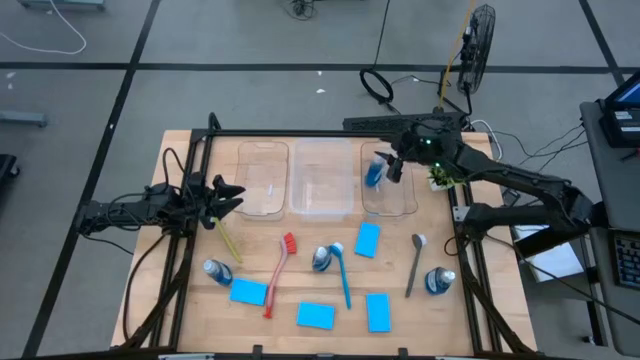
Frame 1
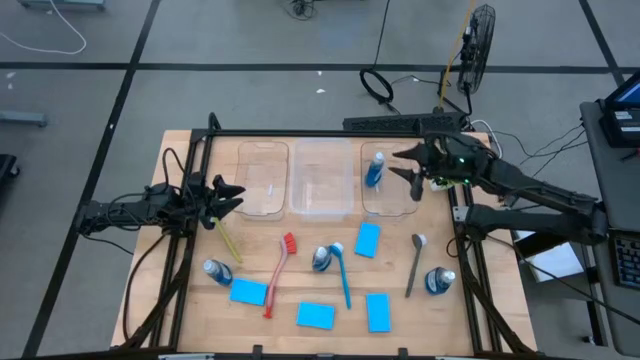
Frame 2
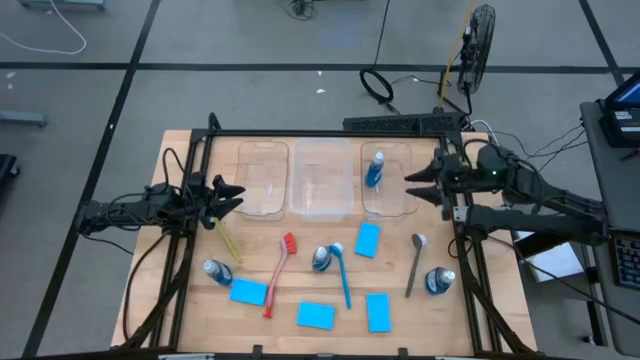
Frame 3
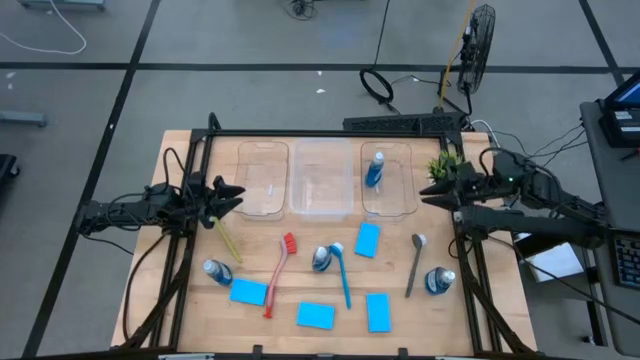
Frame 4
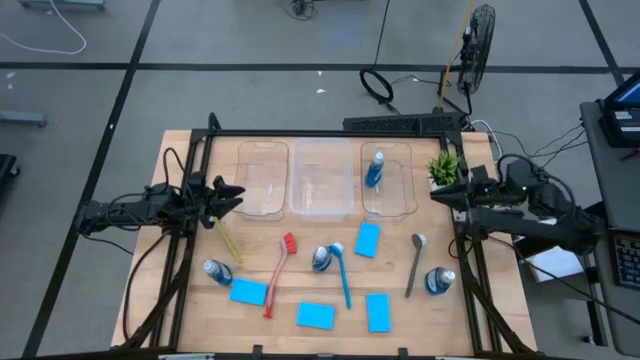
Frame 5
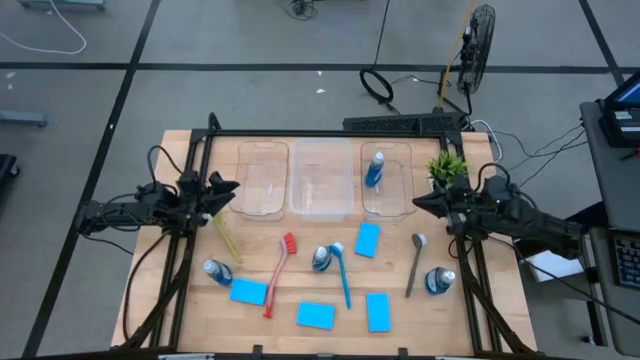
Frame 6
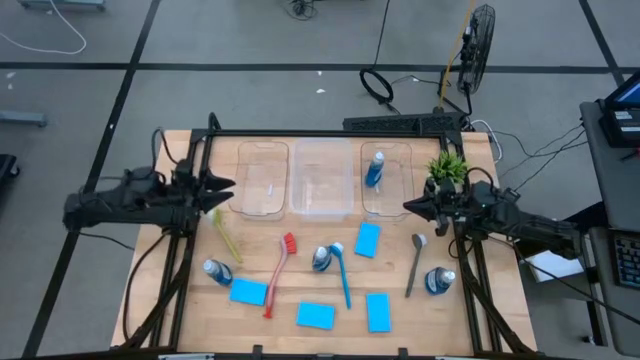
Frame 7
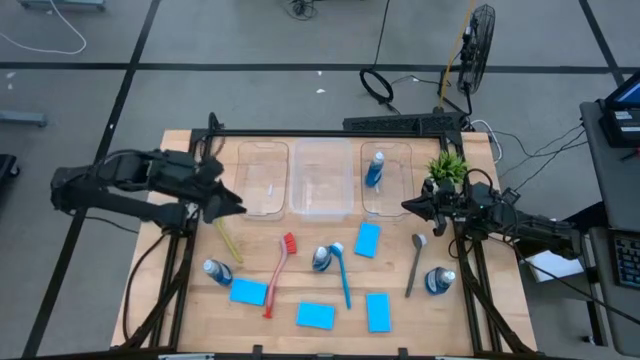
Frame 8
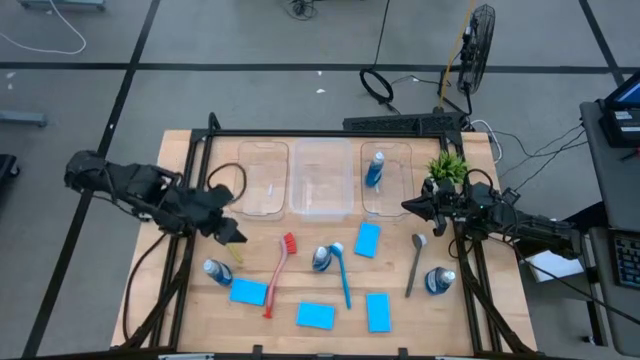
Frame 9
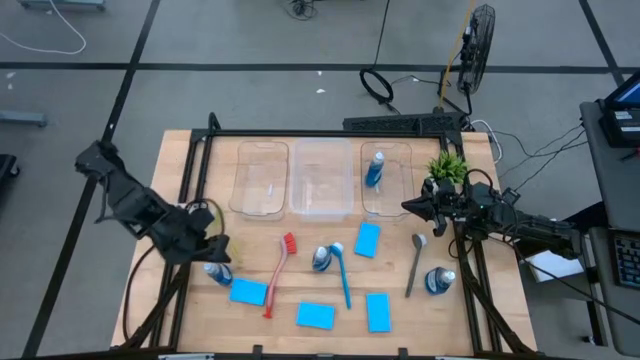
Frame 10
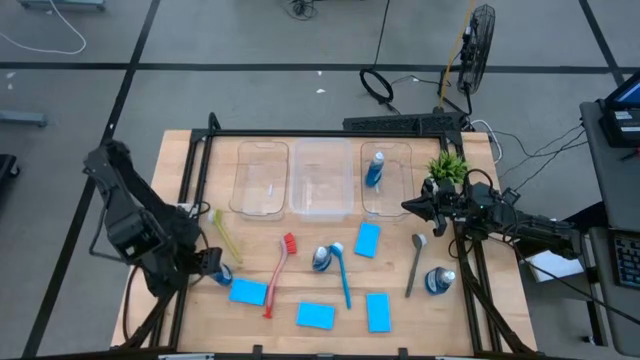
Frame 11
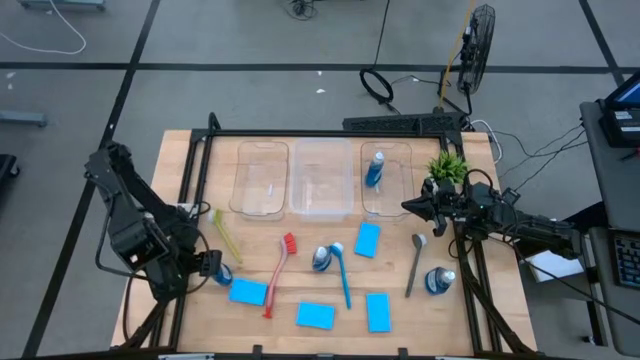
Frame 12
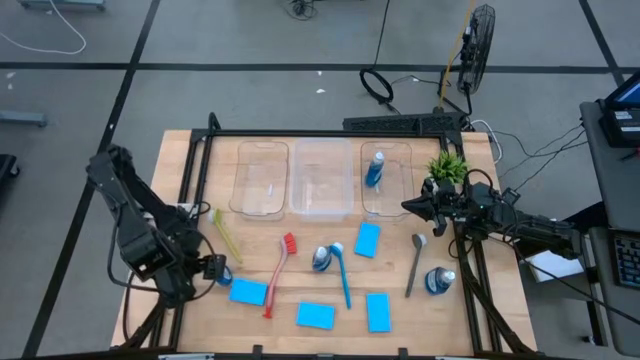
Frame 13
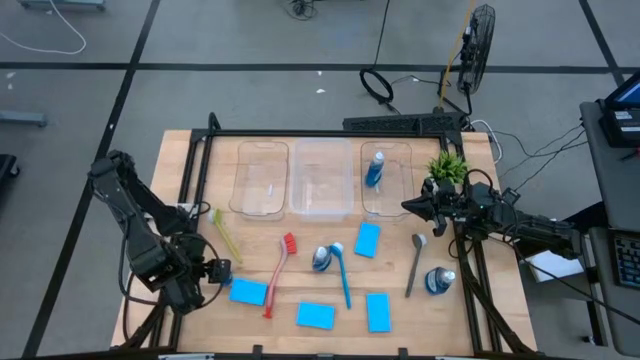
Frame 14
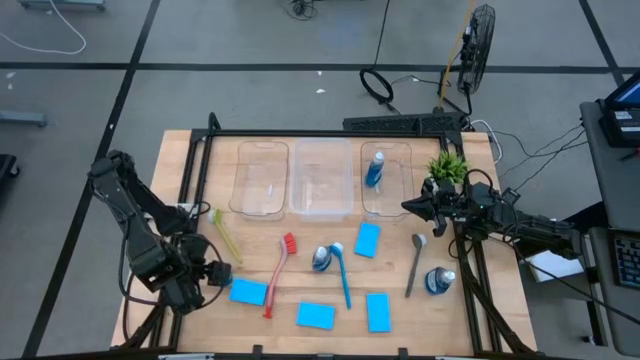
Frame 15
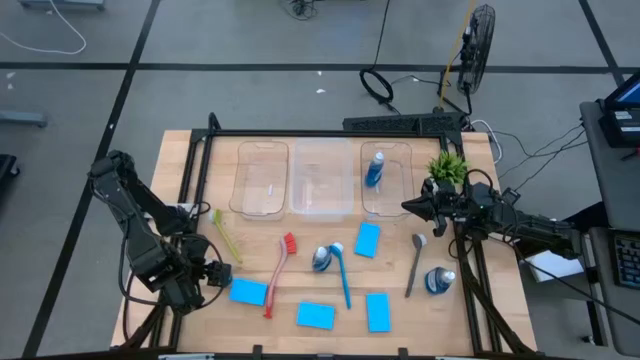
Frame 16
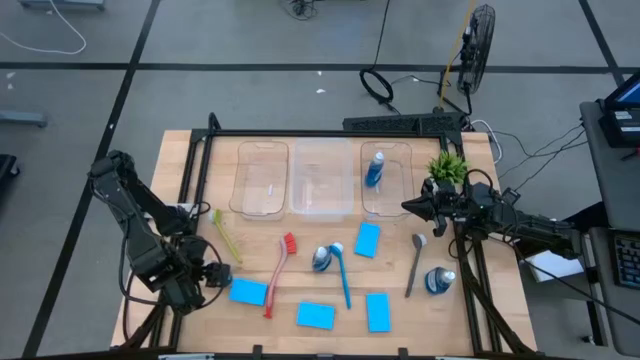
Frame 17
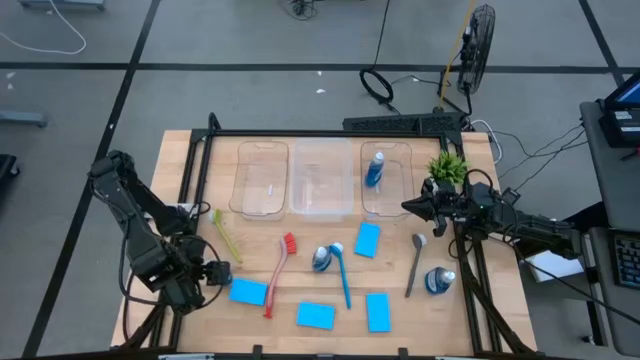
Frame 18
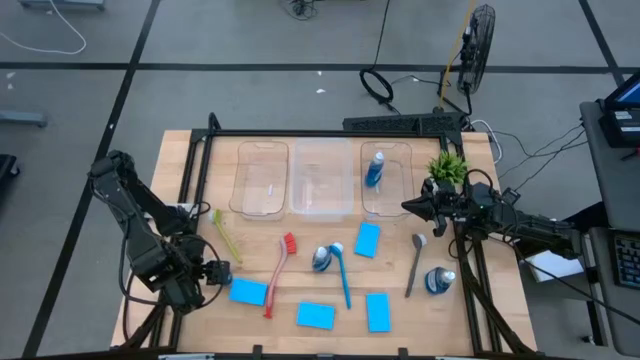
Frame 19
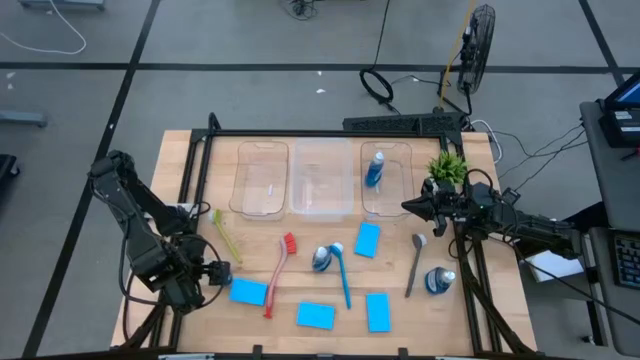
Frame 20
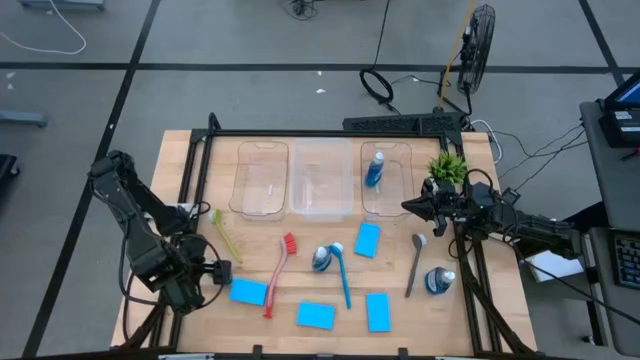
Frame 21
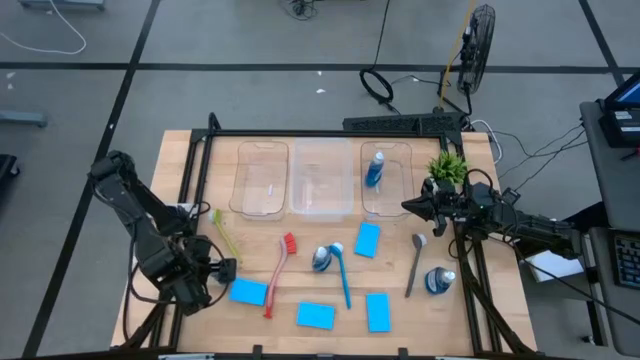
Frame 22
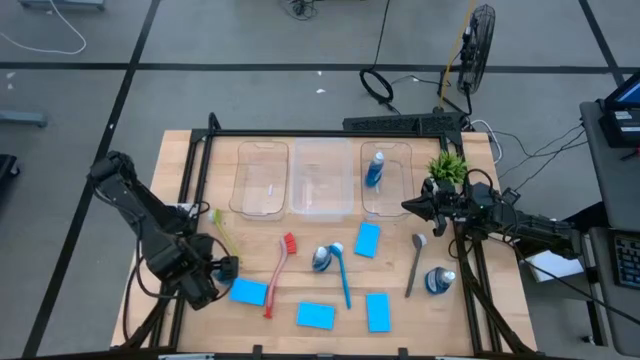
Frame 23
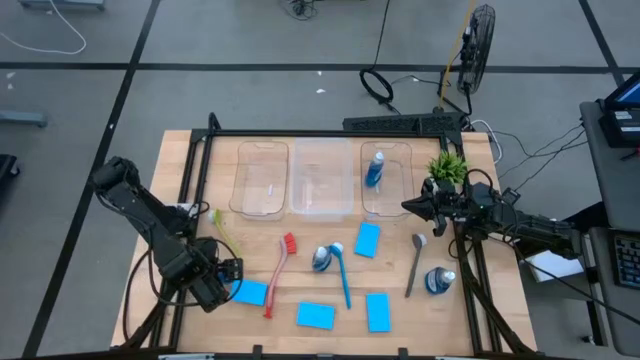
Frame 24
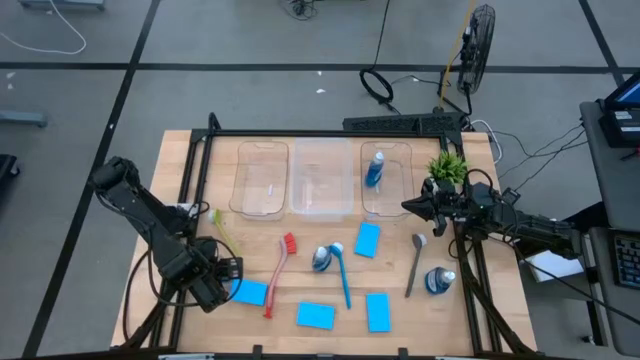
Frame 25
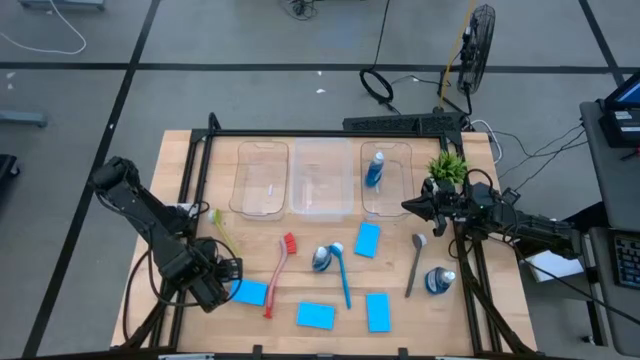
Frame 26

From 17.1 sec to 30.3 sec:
Task: Pick & Place Kitchen Sink Supplies
Put the blue dishwashing liquid bottle into the right transparent bin

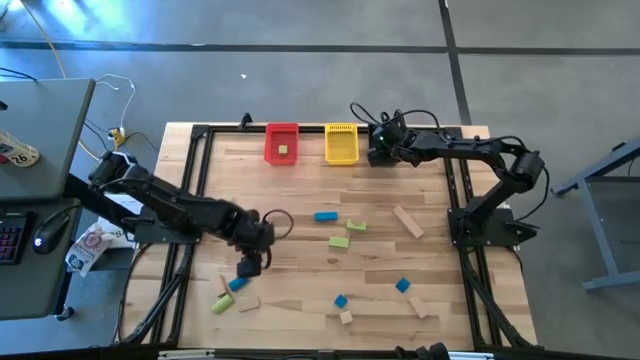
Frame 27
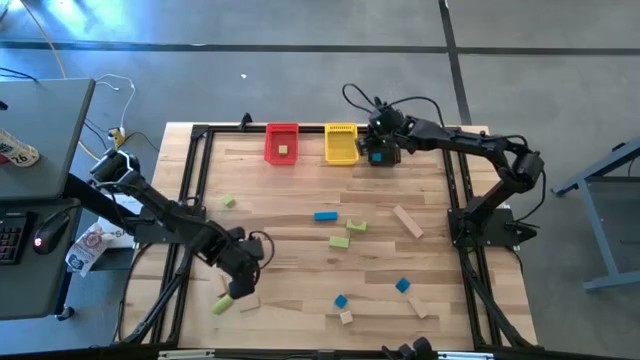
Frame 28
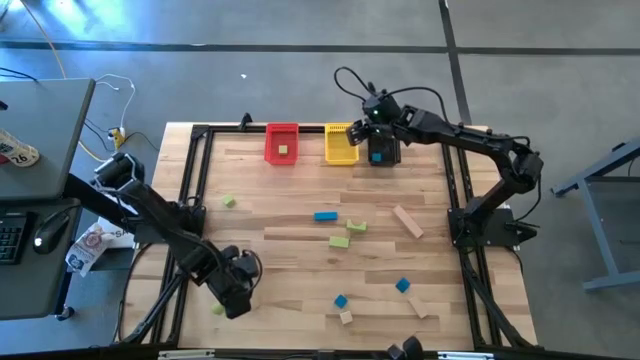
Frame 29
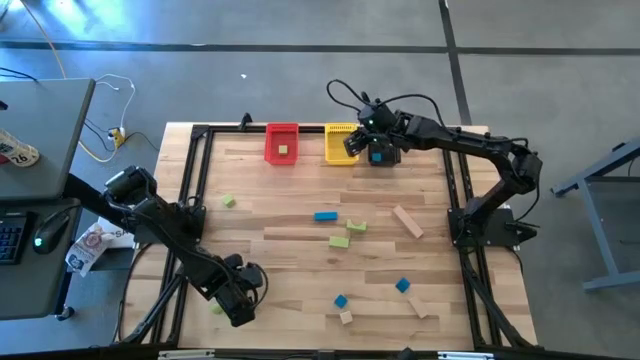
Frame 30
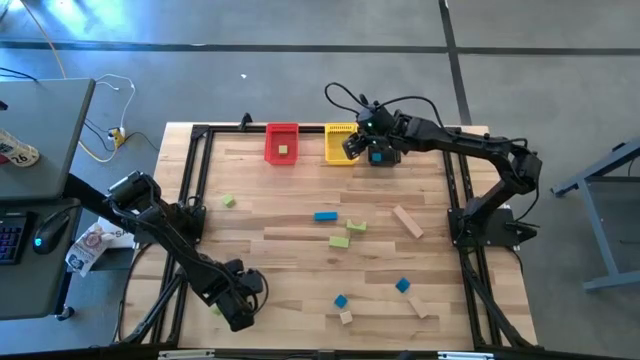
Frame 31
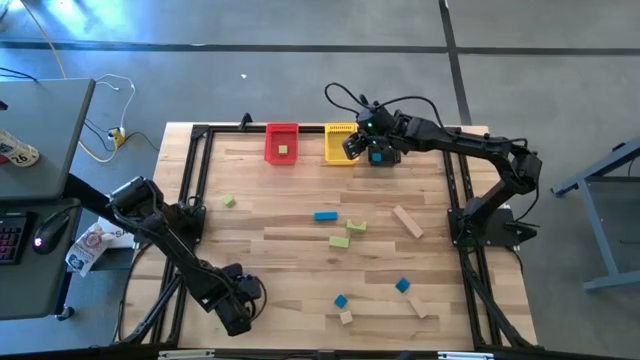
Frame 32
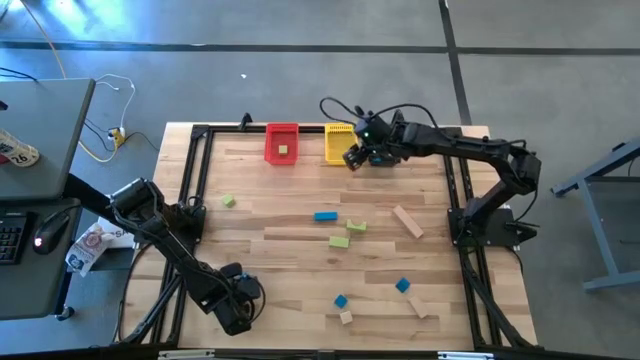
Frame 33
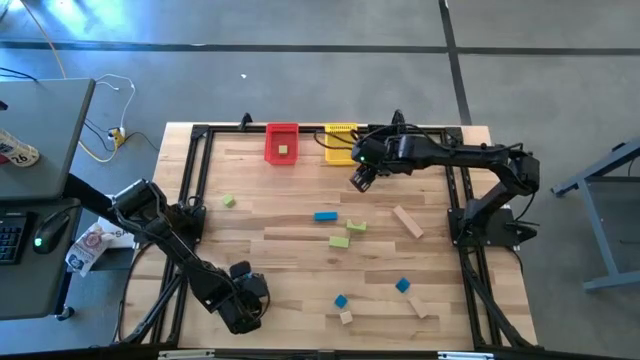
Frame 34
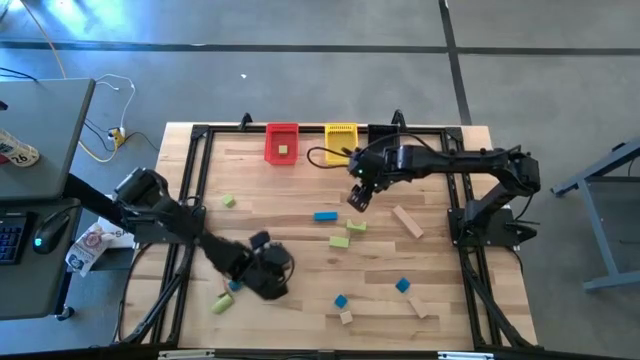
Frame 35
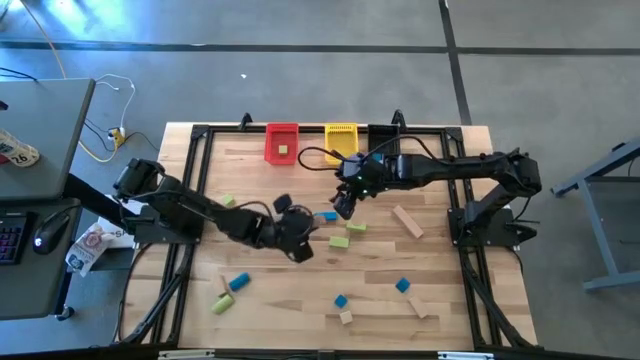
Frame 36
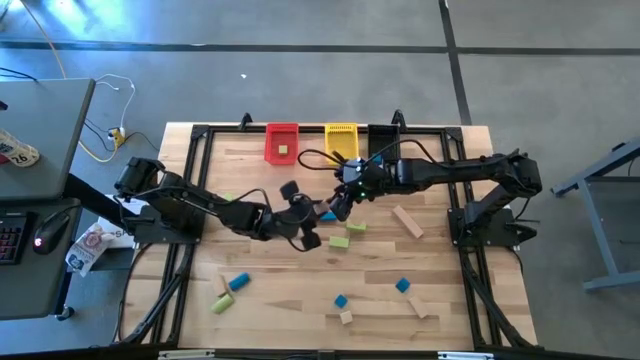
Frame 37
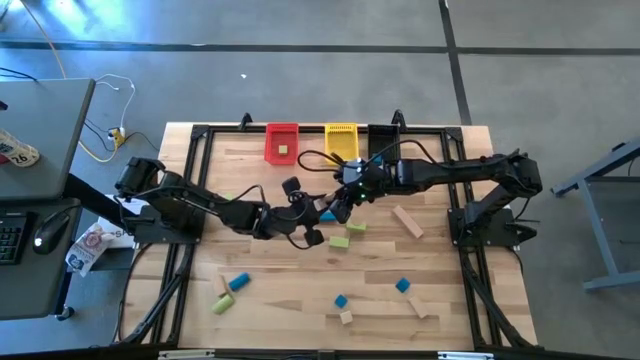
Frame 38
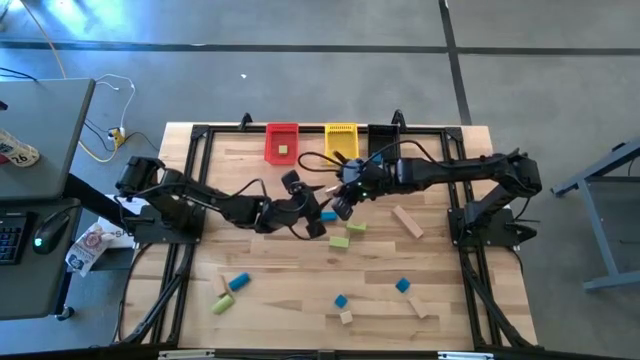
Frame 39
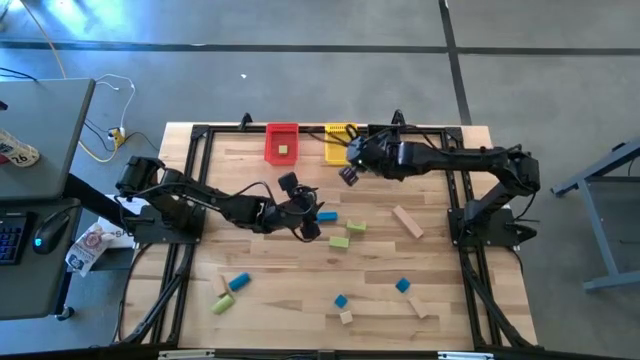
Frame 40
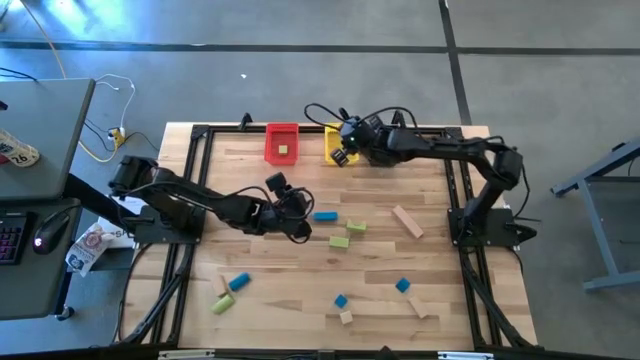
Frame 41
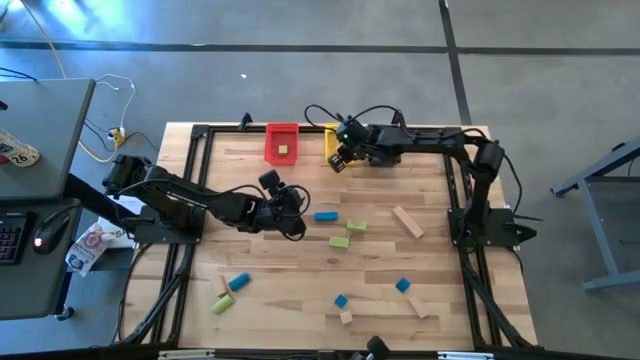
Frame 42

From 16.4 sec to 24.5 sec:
Task: Sort & place blocks by color
Put the beige block into the yellow bin
